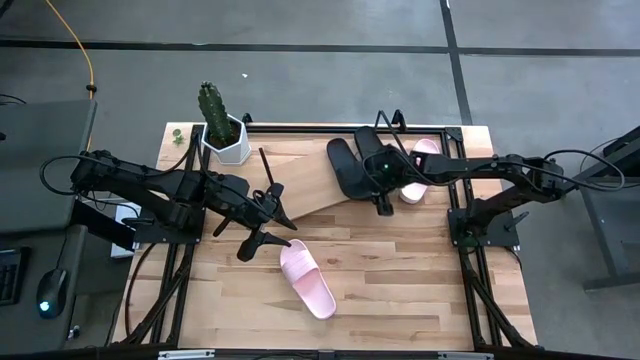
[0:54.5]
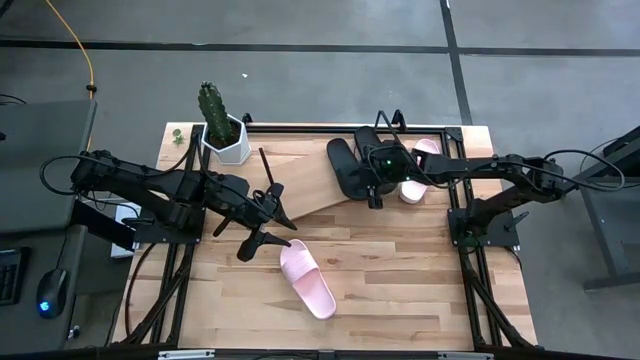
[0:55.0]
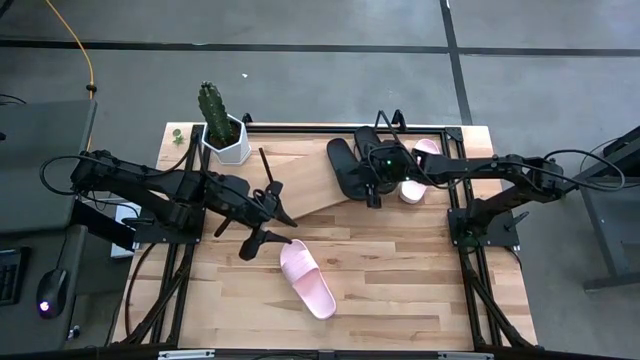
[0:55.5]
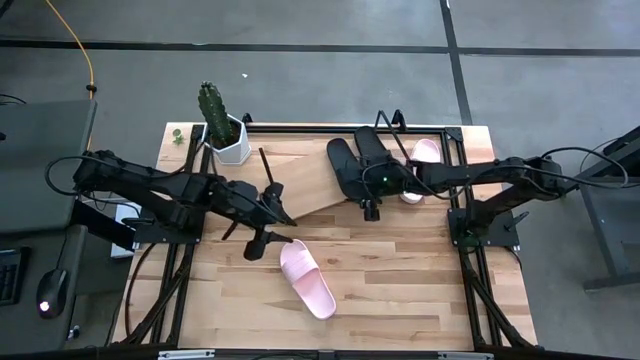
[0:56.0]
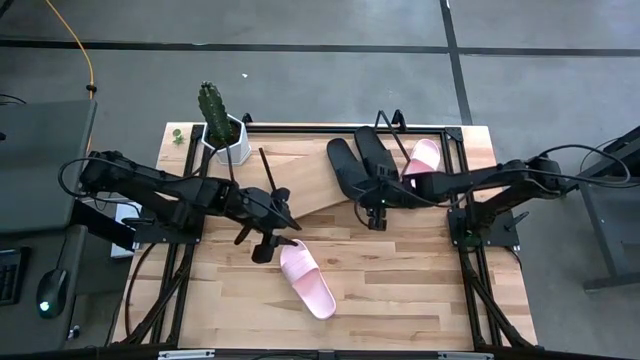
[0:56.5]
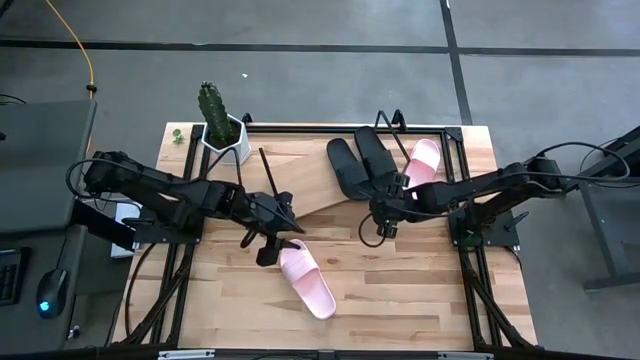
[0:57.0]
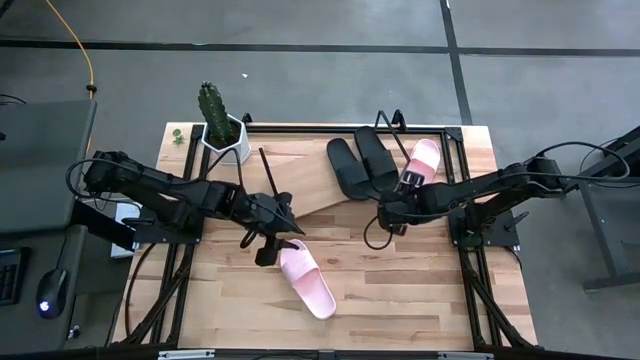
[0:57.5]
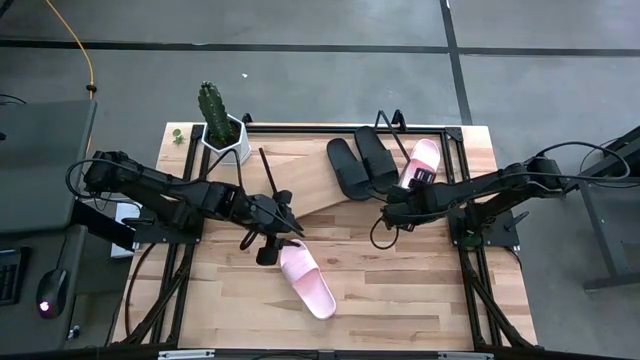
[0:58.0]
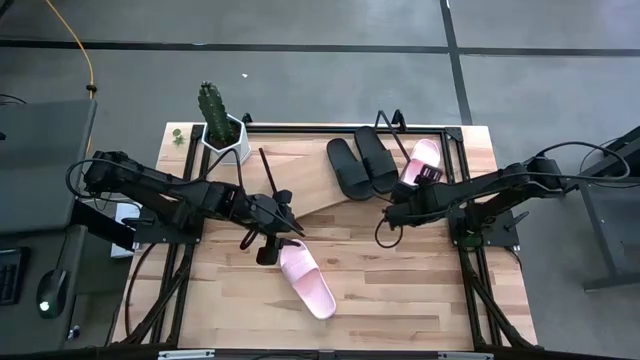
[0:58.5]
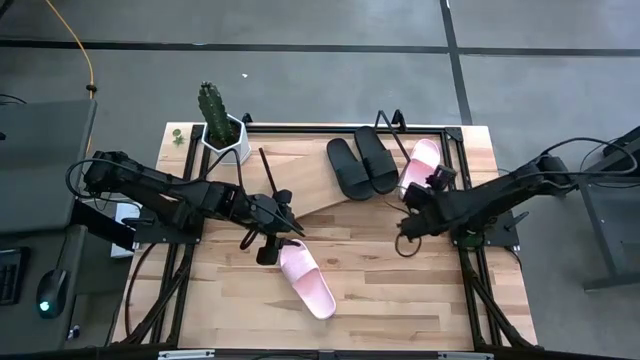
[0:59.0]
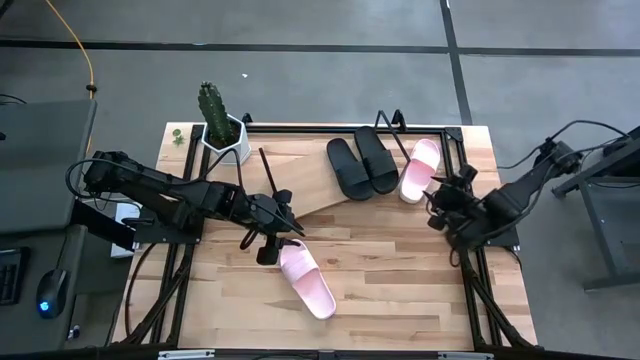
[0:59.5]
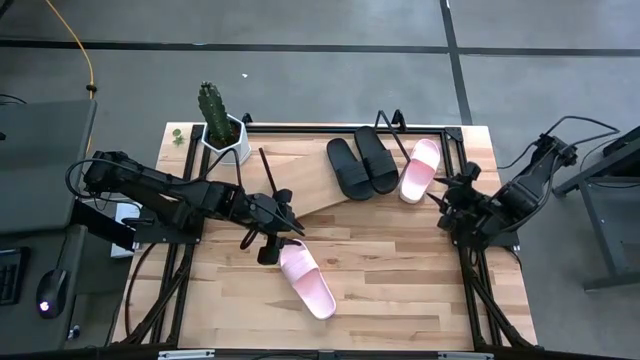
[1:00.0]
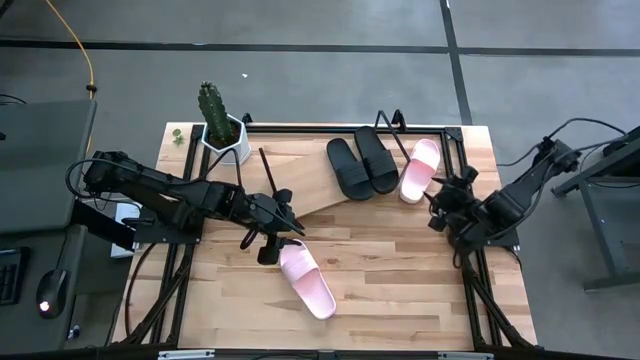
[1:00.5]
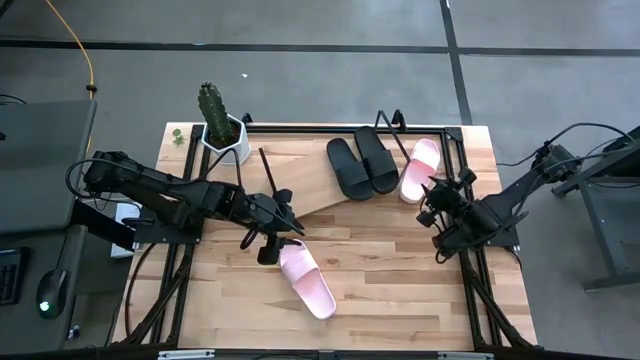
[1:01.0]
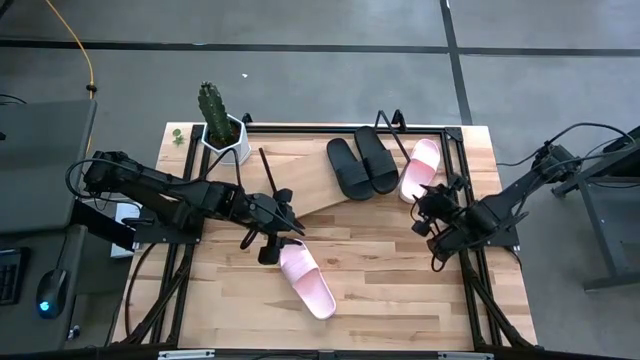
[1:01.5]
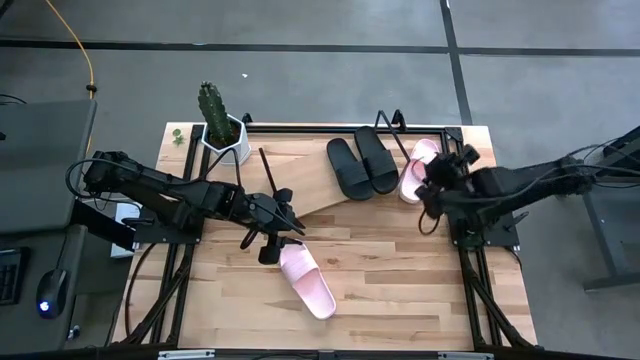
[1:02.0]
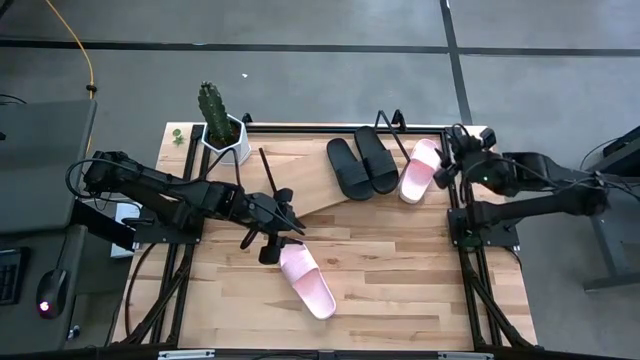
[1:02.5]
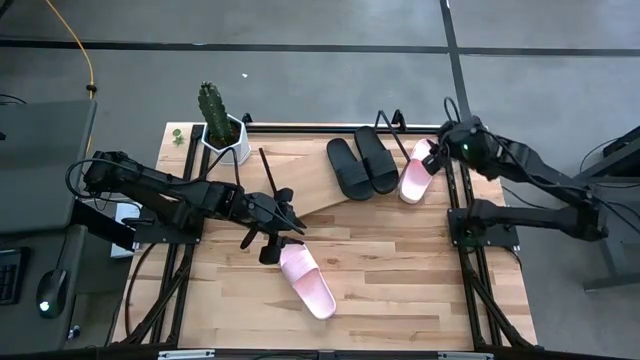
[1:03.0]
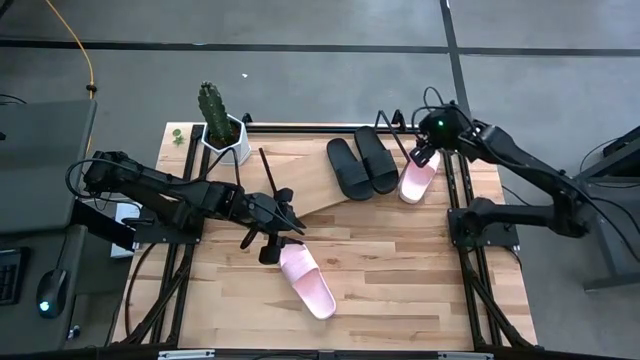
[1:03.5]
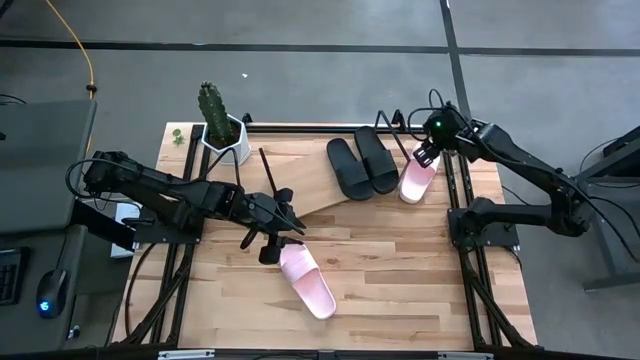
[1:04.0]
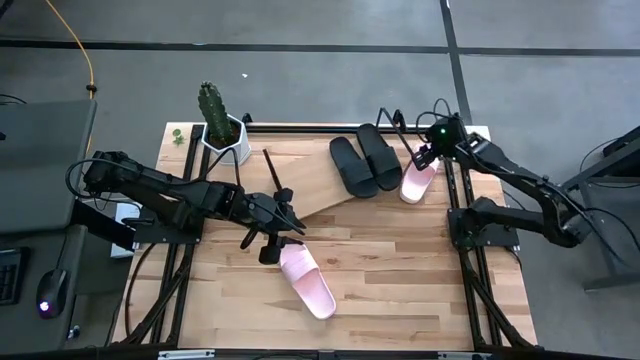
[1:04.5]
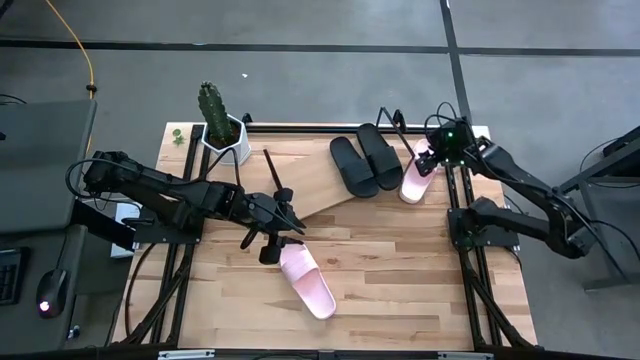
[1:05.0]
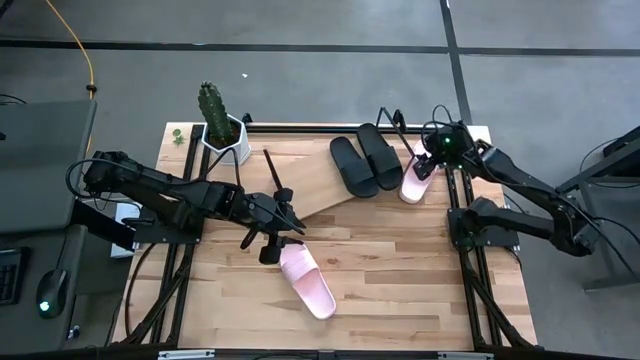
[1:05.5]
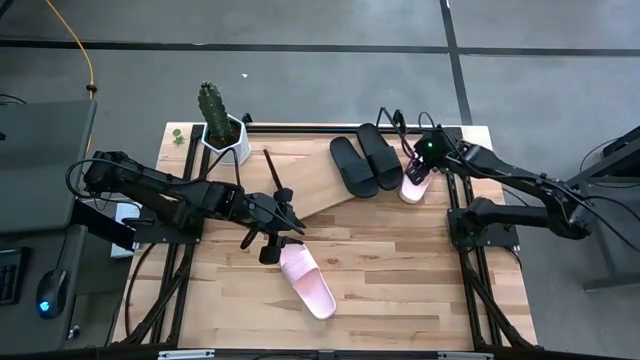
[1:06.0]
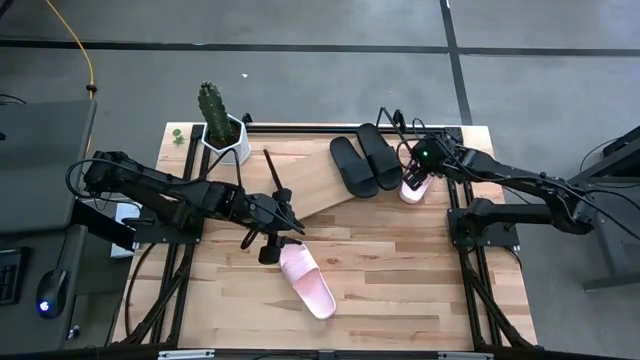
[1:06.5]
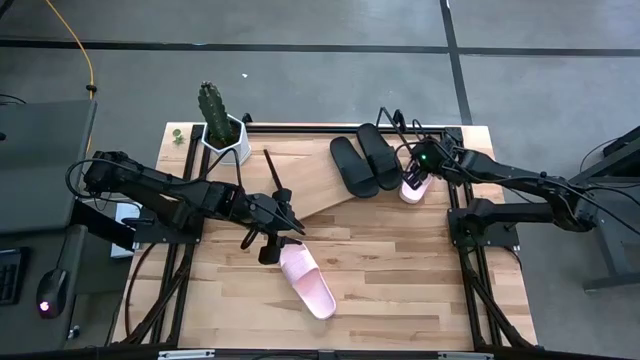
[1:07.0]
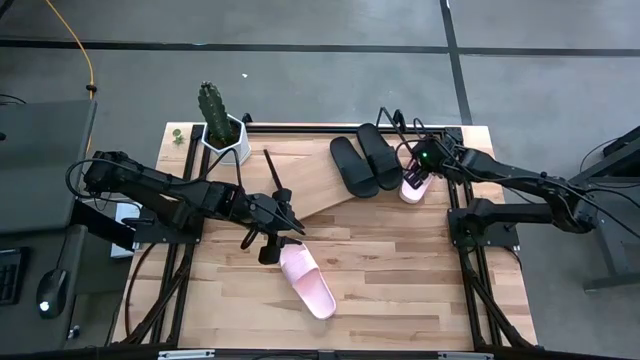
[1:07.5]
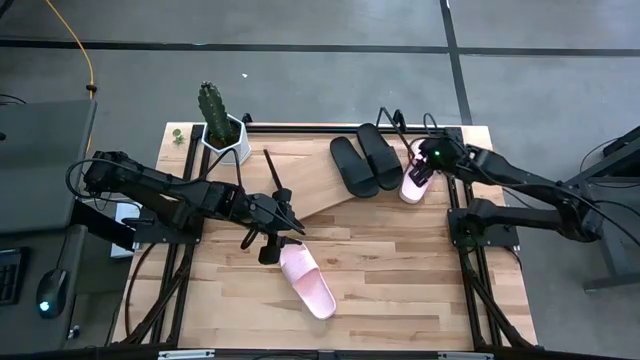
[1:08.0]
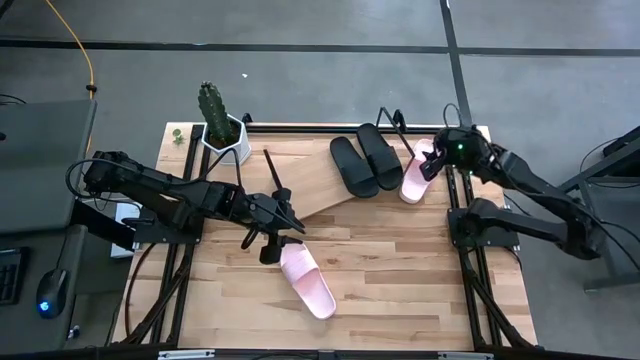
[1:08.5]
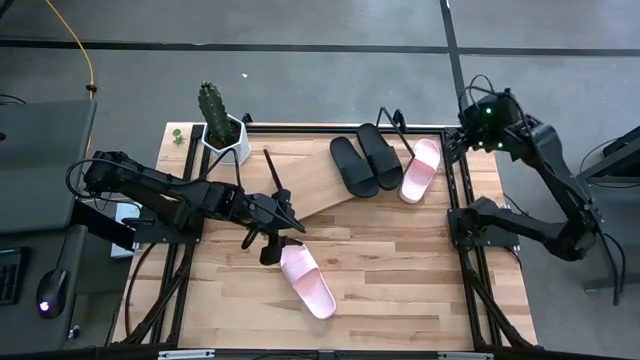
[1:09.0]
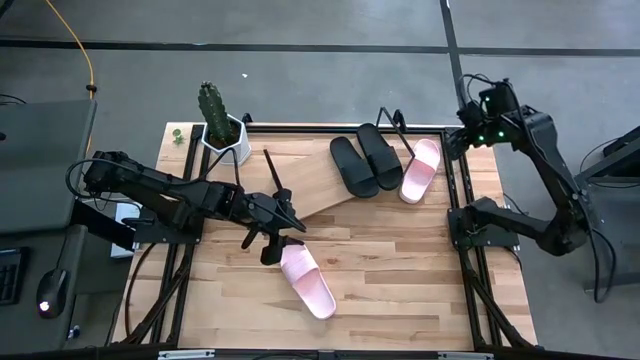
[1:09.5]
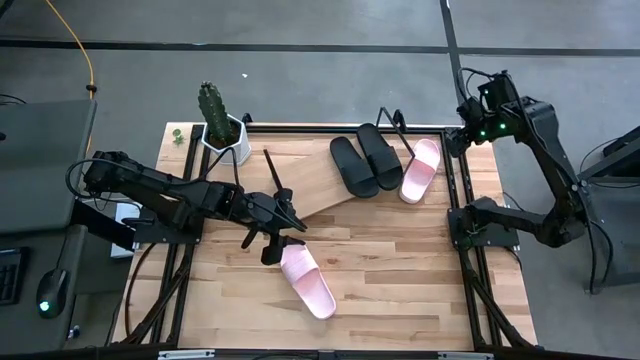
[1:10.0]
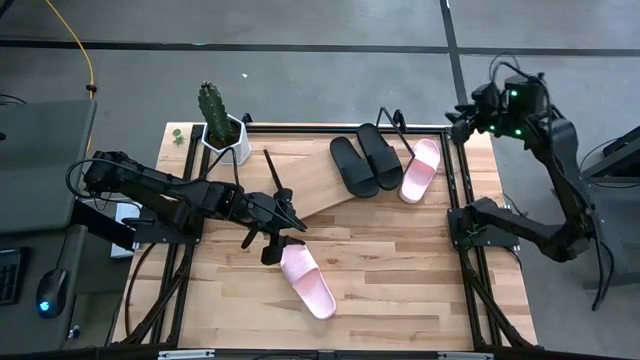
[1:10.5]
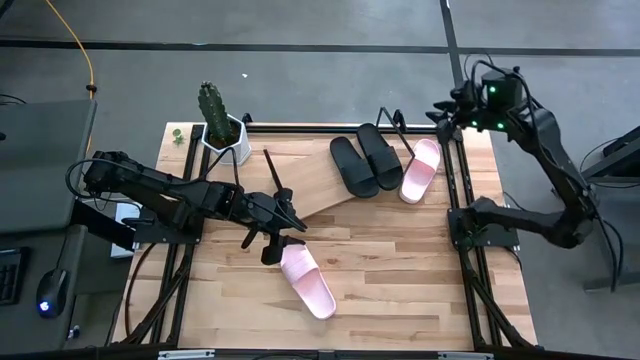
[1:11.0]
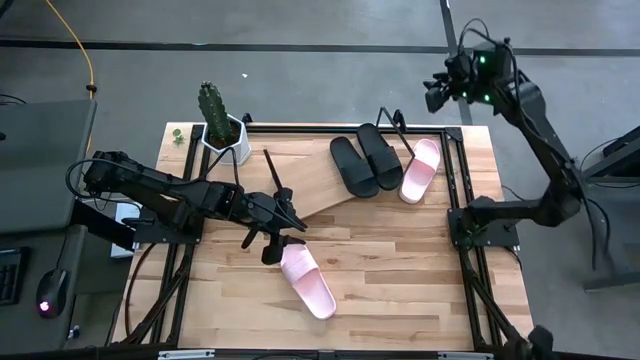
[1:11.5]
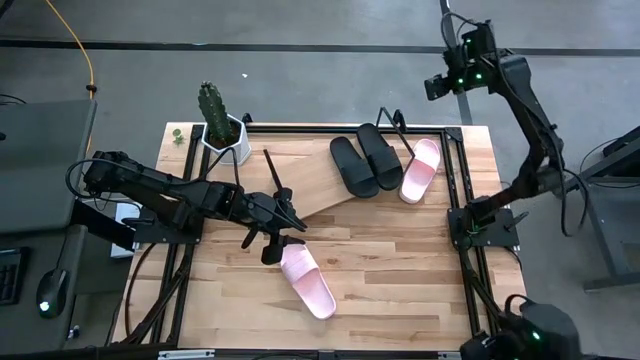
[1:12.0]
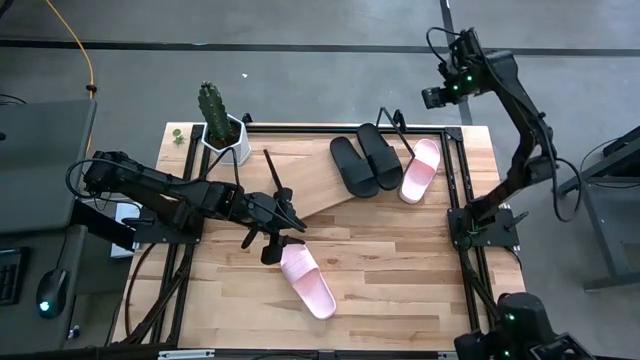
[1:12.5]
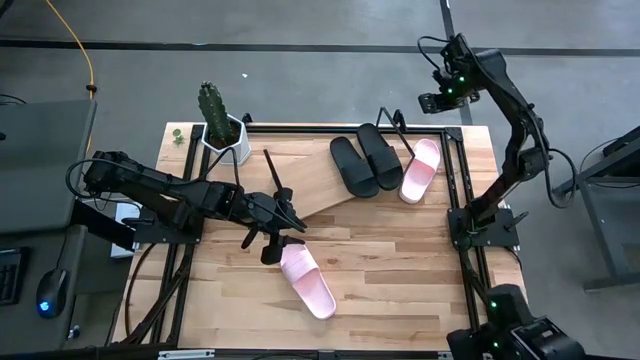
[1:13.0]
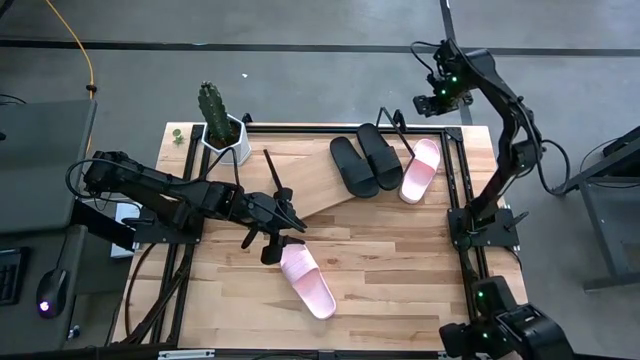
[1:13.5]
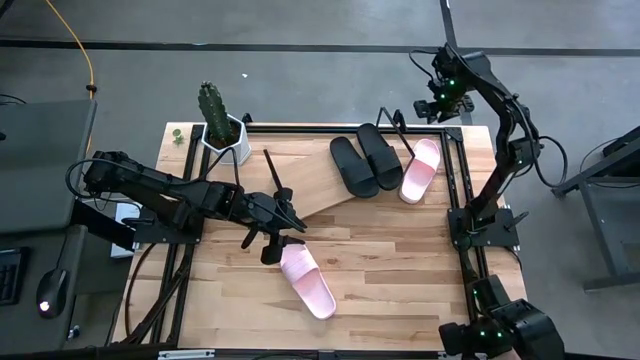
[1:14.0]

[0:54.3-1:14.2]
Task: Pick and place slides into the shelf
Put the top pink slide on the shelf
